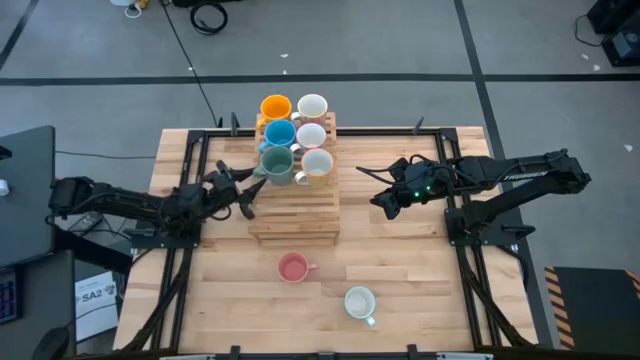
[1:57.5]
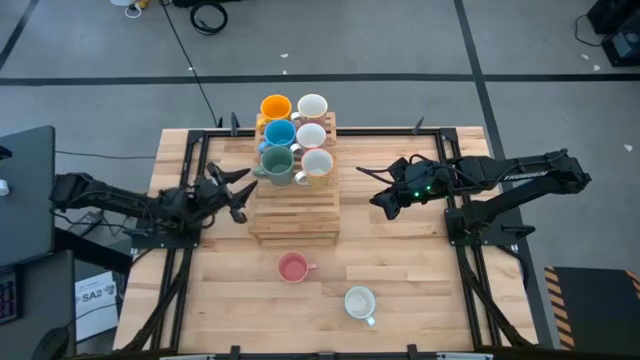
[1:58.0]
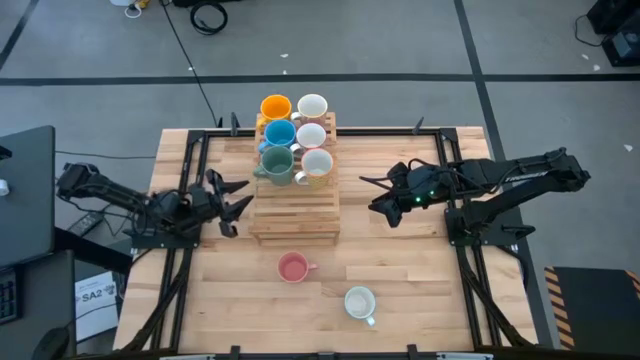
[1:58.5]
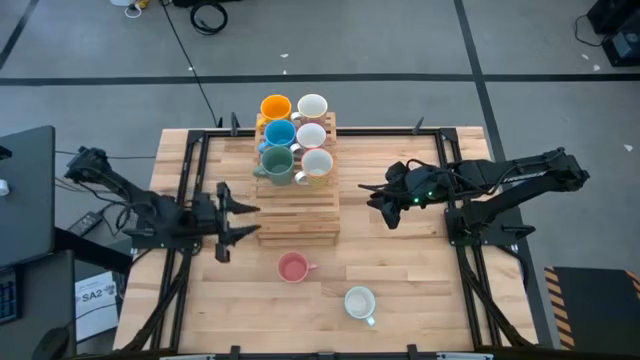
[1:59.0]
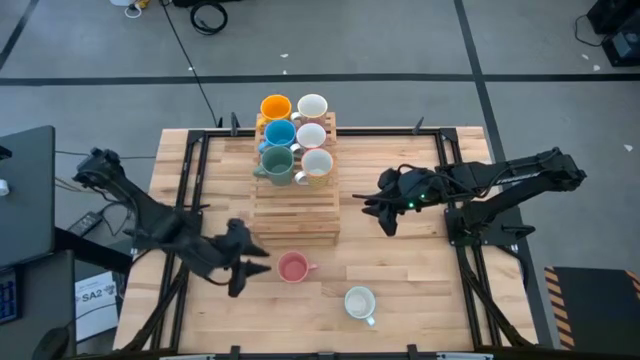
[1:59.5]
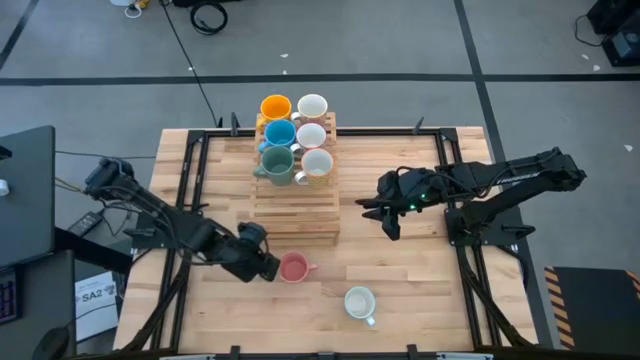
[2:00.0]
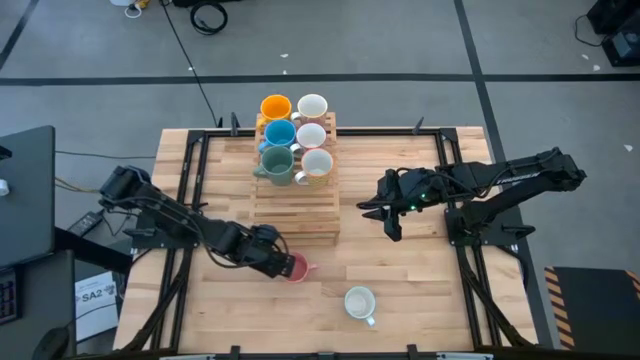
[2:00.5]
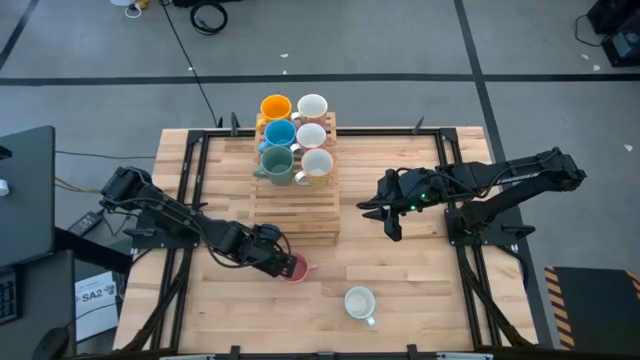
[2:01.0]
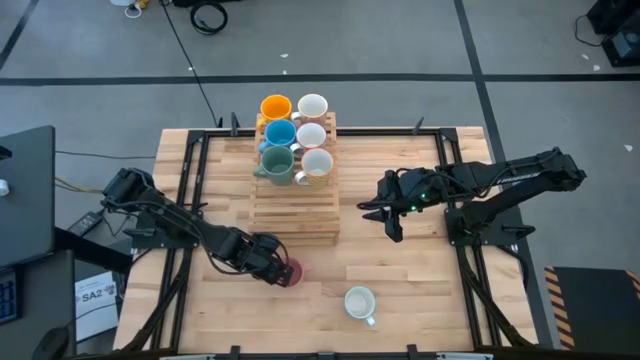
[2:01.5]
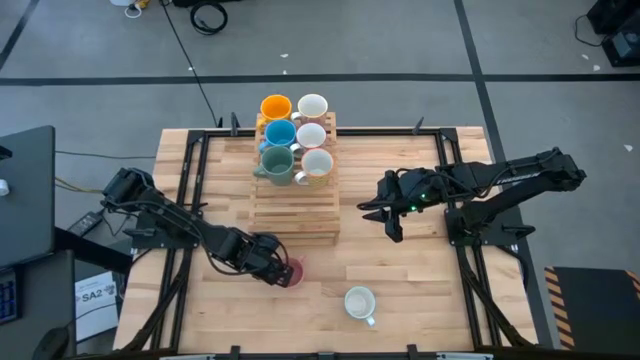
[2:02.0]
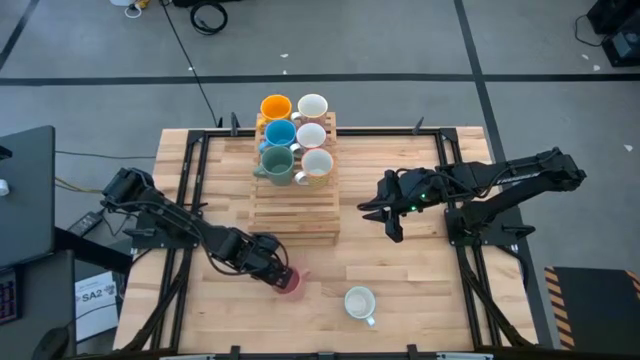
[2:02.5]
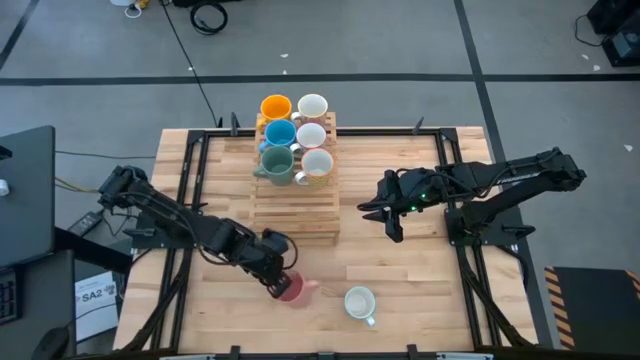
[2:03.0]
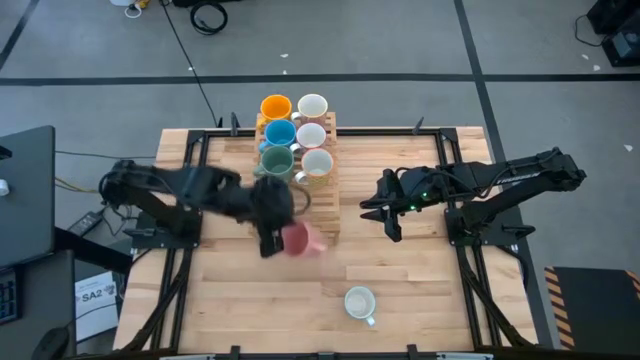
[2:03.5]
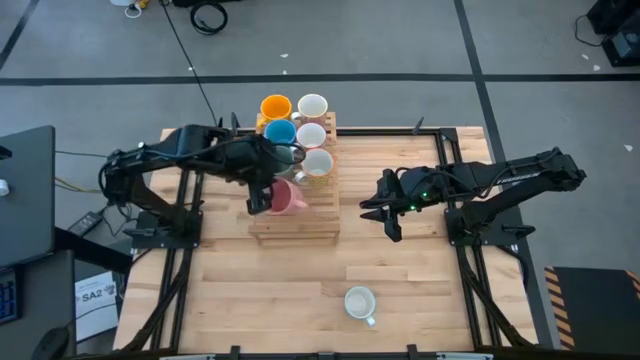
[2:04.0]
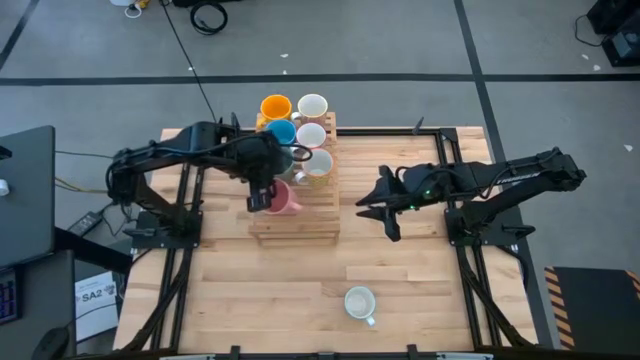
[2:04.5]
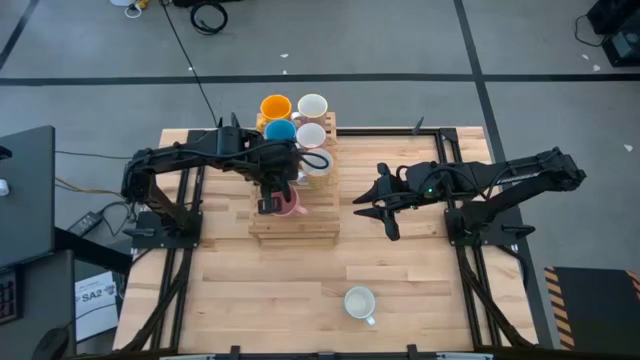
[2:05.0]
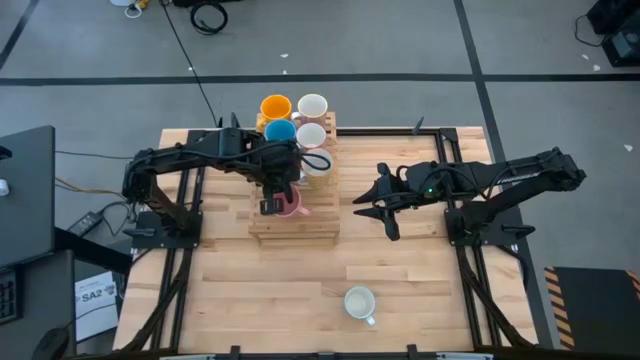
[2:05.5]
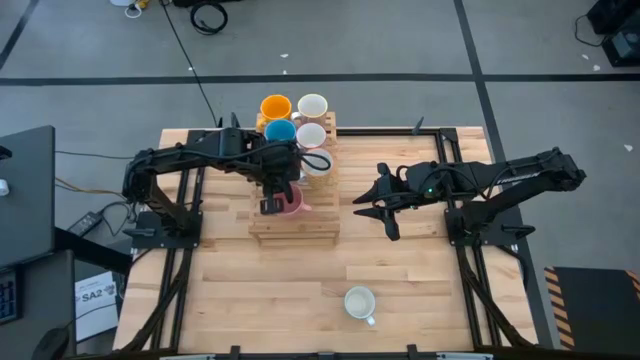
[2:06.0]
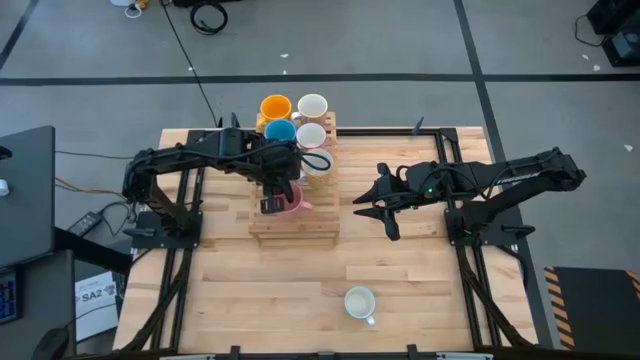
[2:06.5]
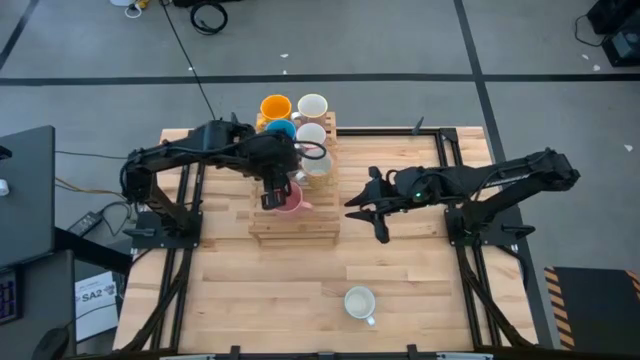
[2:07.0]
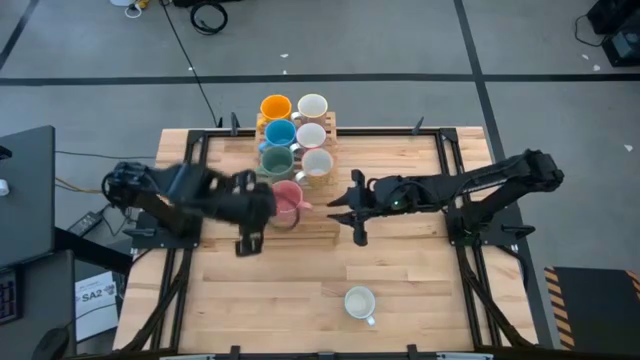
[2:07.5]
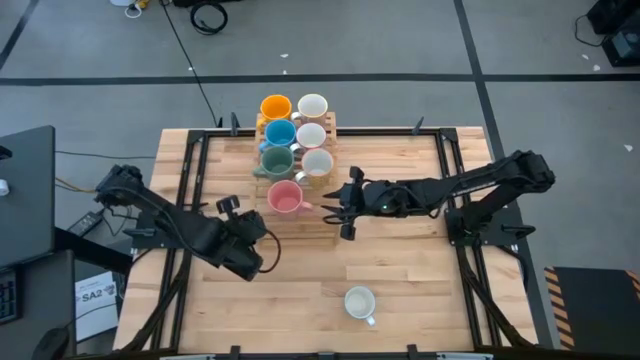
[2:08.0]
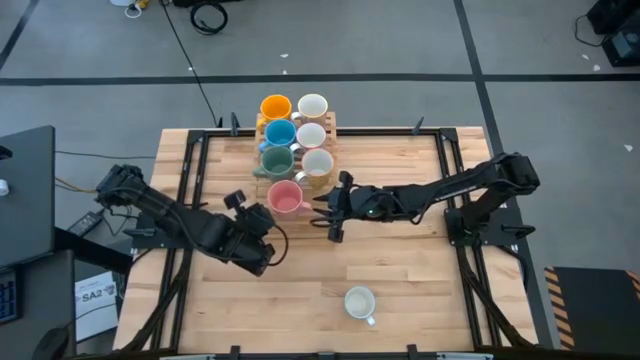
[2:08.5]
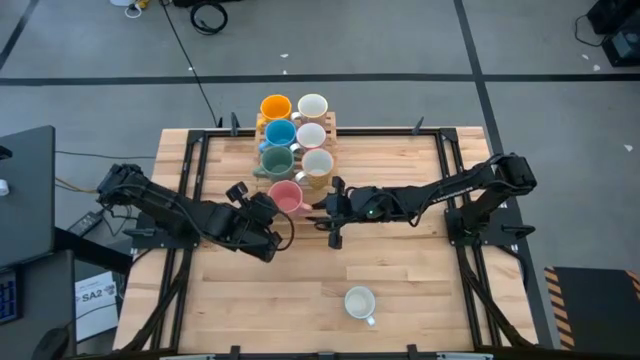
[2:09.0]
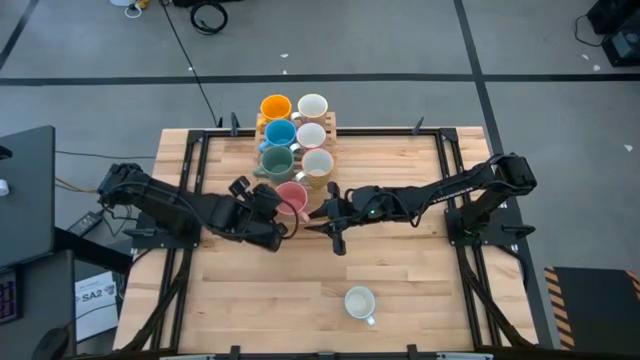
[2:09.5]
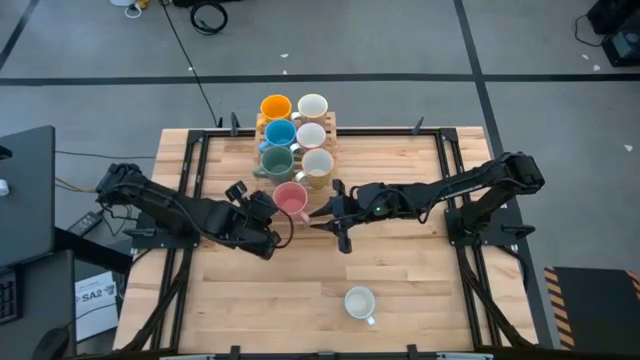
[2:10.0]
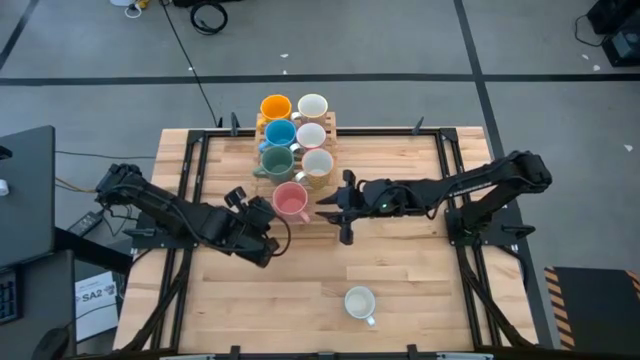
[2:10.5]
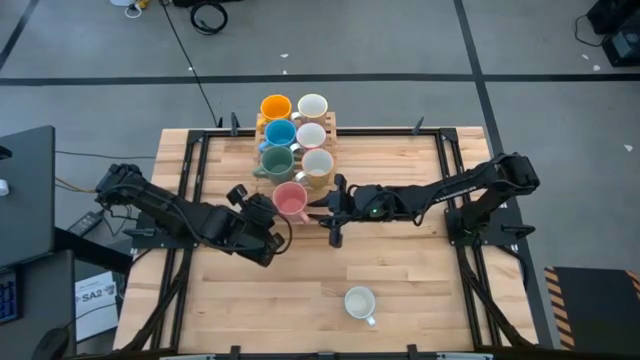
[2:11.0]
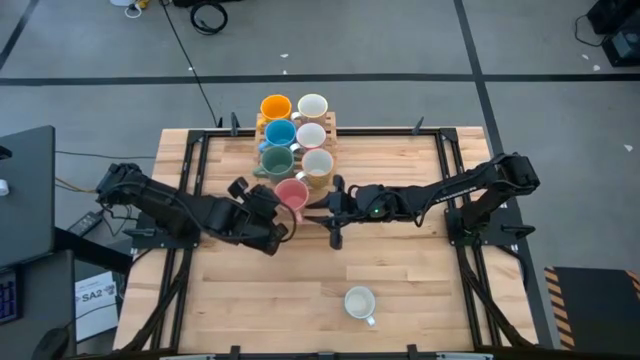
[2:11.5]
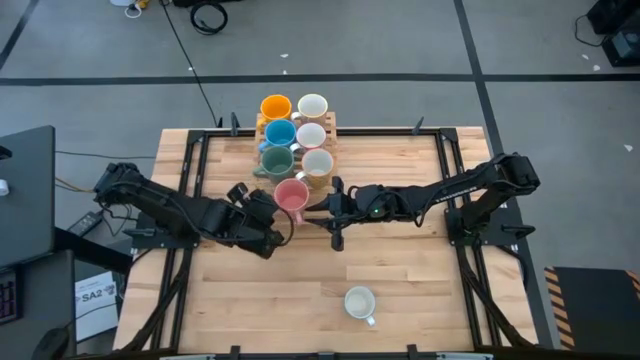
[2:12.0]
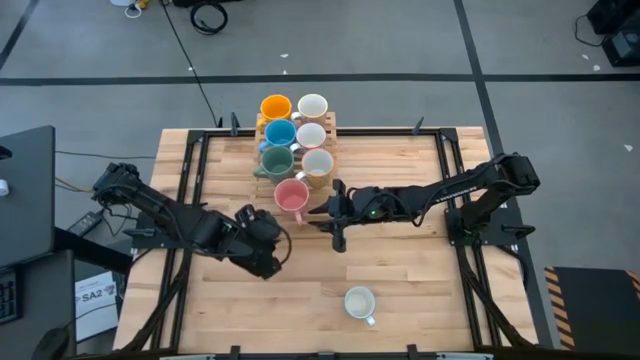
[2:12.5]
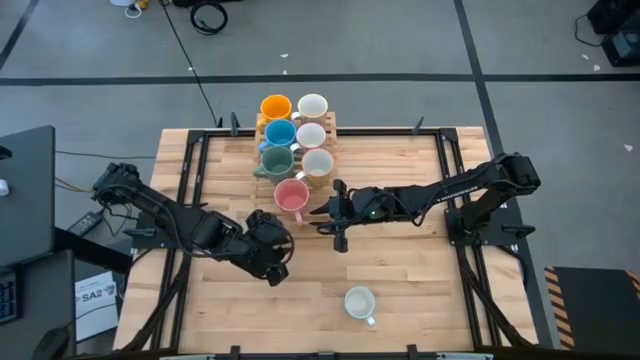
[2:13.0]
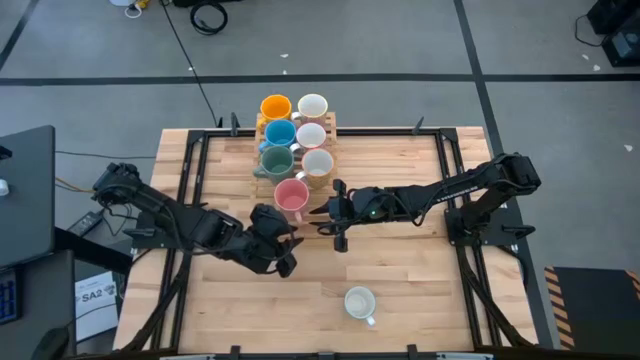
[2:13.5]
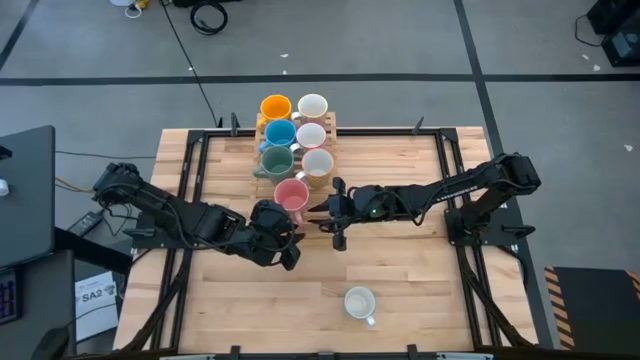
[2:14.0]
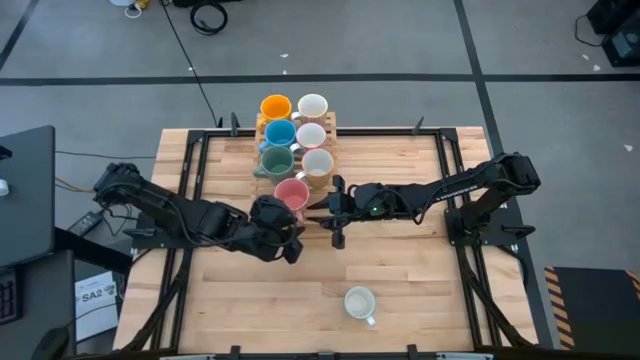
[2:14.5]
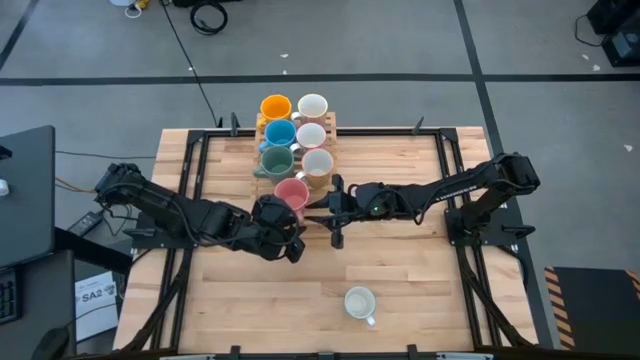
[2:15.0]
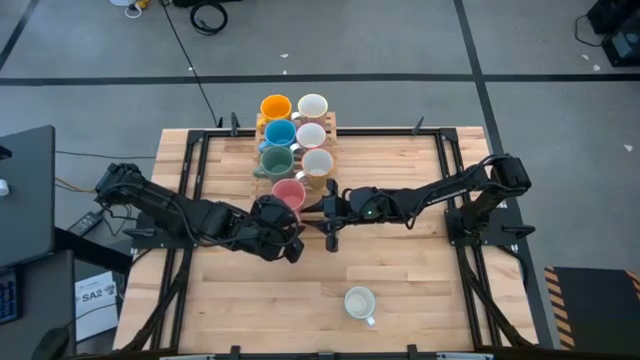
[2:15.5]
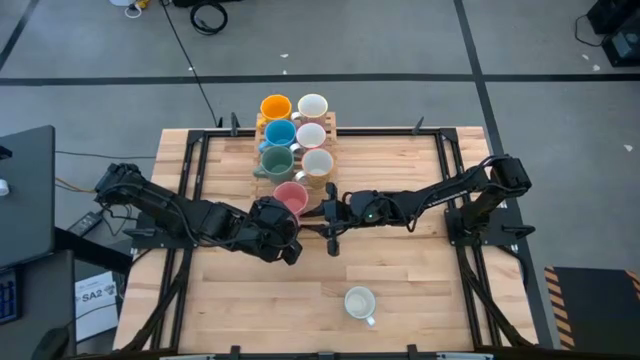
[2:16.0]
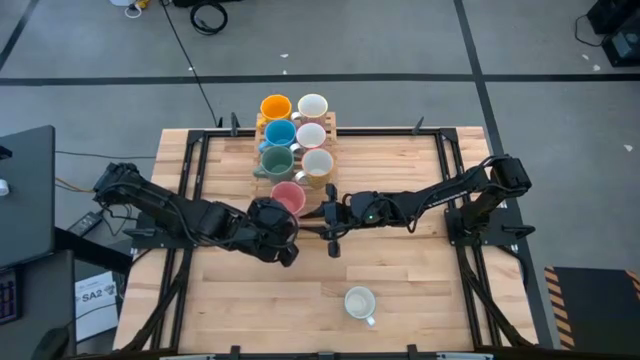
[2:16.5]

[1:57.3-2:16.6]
Task: Place coffee mugs
Put the pink mug on the shelf

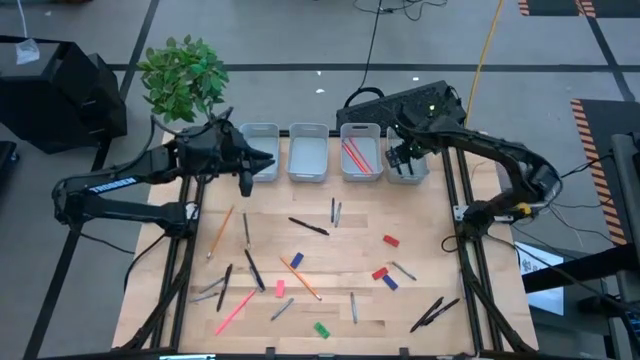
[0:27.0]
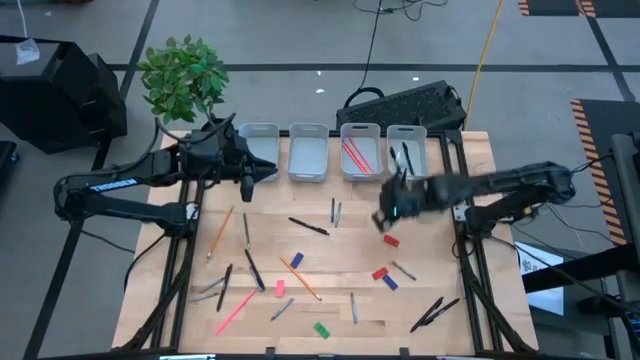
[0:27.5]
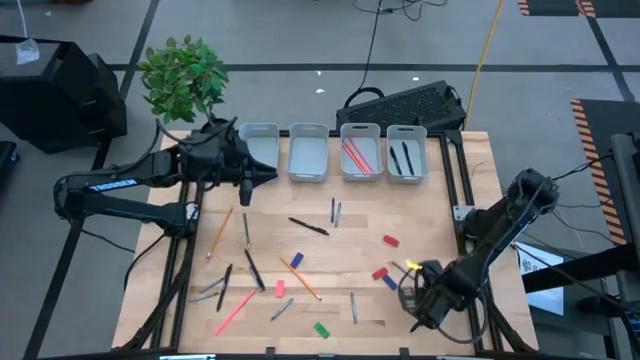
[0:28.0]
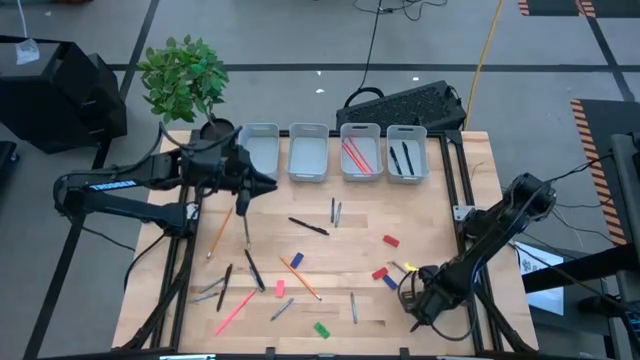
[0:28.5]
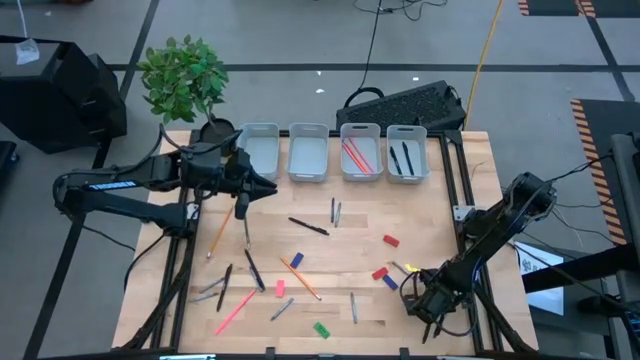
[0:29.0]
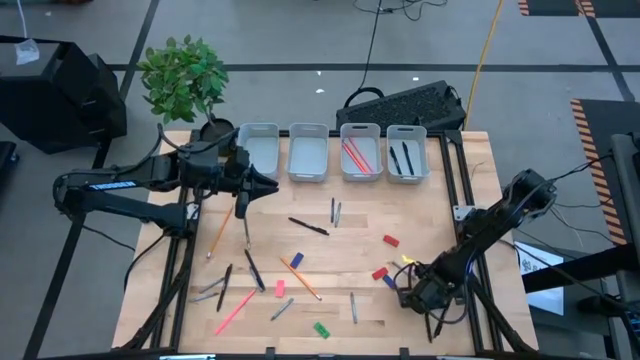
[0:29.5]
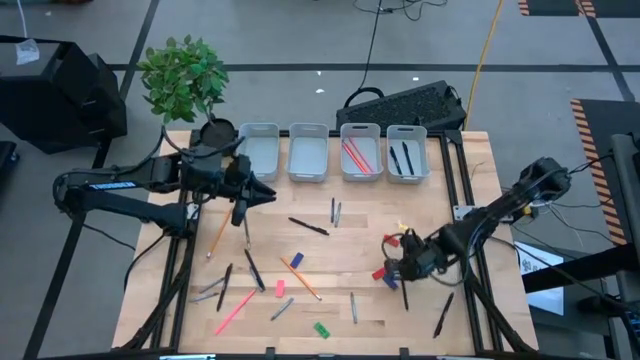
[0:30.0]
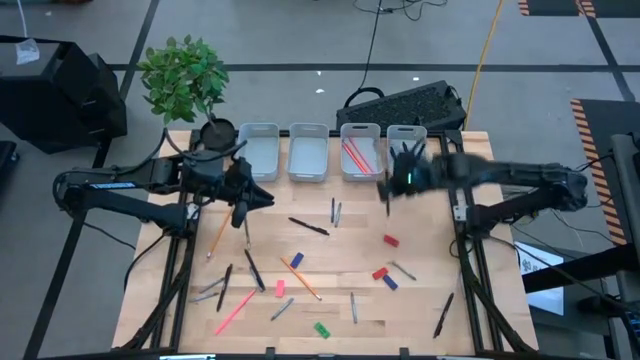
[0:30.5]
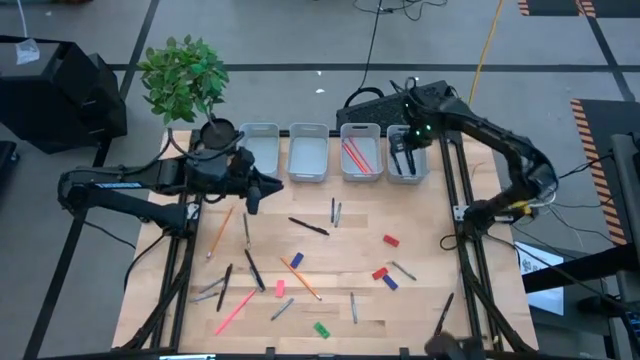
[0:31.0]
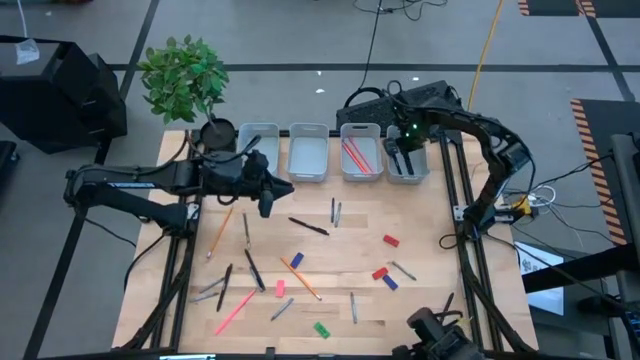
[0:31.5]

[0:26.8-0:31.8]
Task: Sort crayons/erasers/pens/pencils in bins
Put the black pen into the top right gray bin
